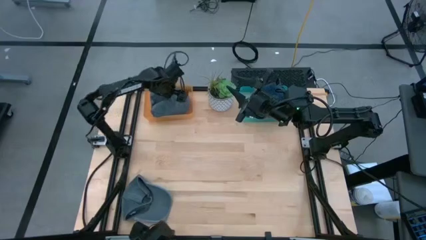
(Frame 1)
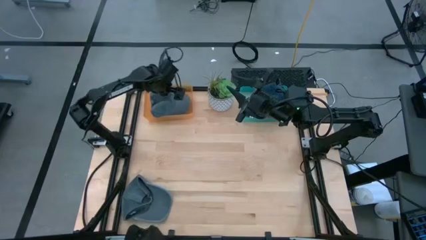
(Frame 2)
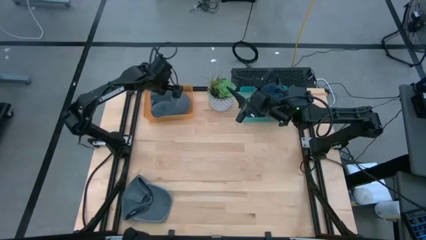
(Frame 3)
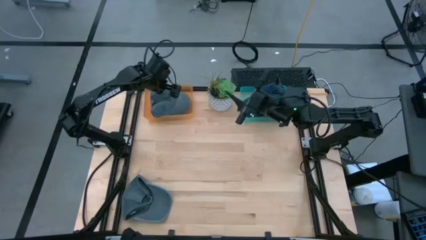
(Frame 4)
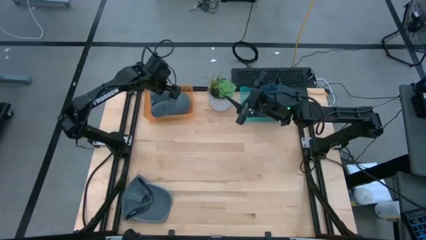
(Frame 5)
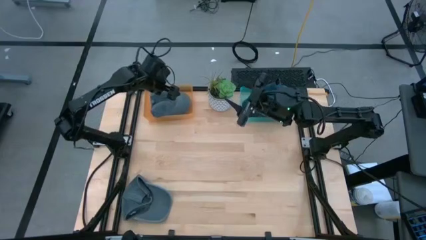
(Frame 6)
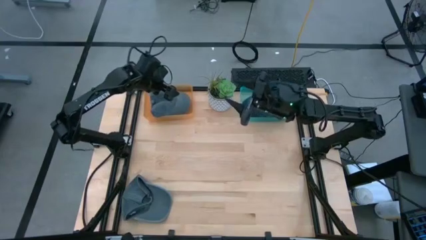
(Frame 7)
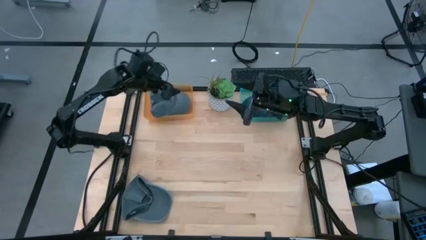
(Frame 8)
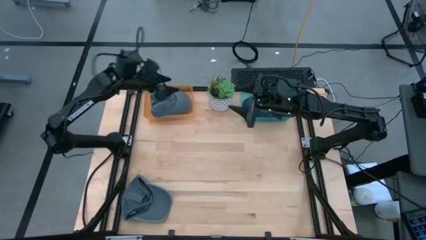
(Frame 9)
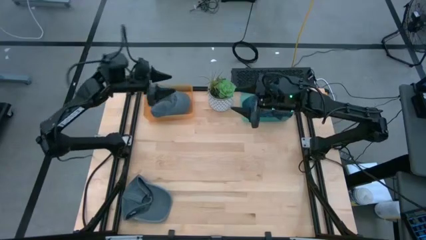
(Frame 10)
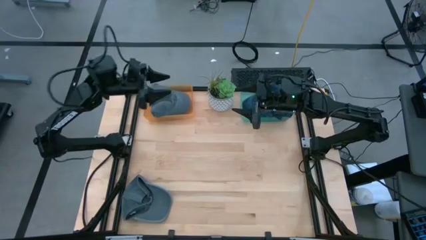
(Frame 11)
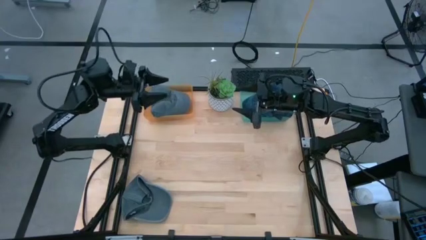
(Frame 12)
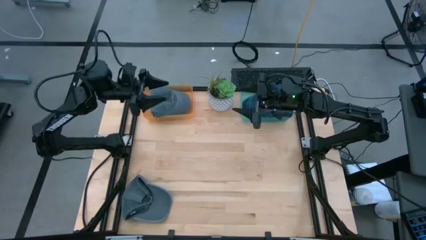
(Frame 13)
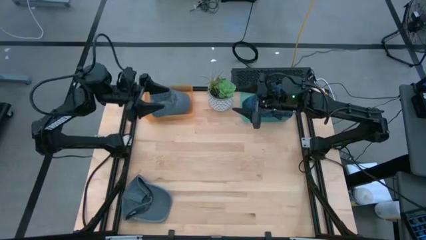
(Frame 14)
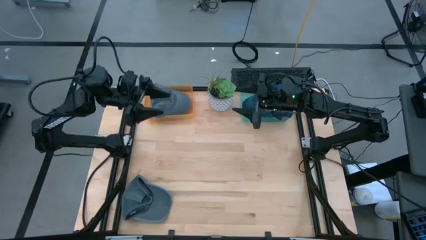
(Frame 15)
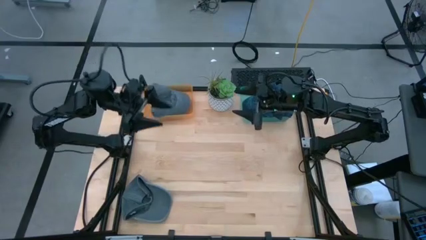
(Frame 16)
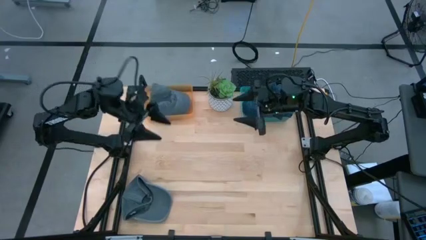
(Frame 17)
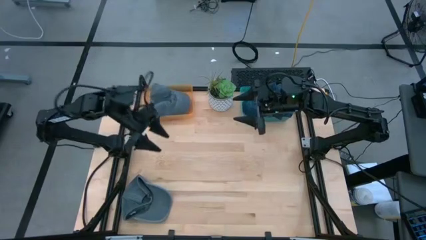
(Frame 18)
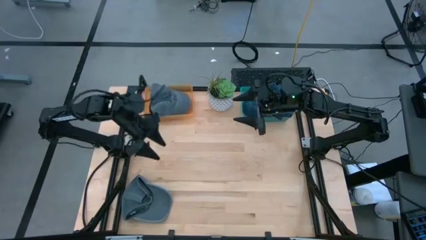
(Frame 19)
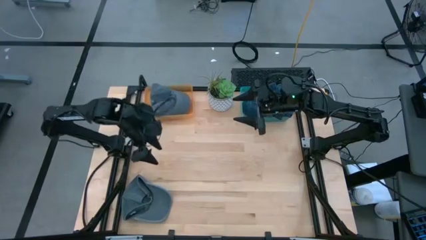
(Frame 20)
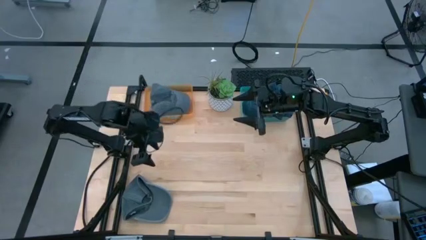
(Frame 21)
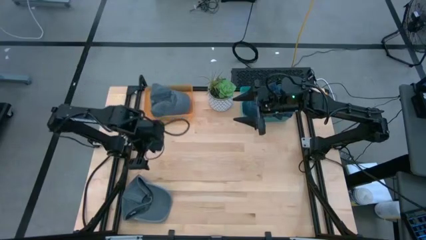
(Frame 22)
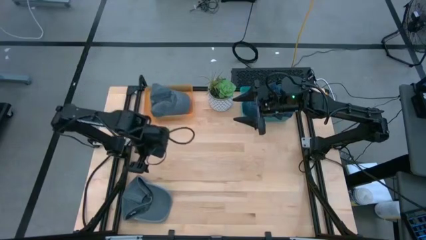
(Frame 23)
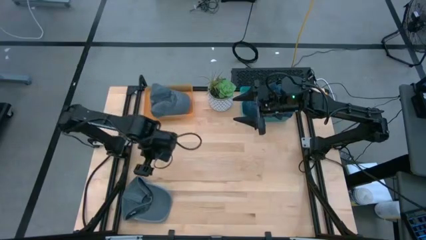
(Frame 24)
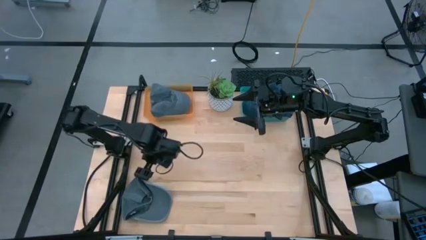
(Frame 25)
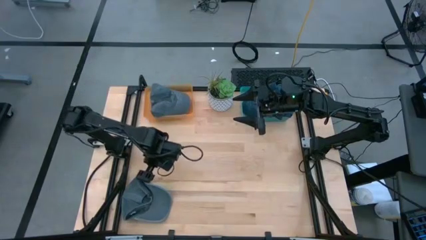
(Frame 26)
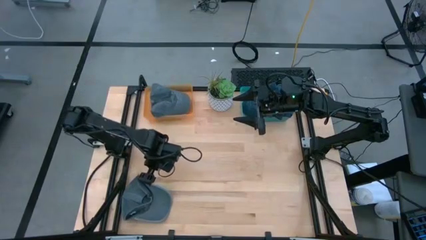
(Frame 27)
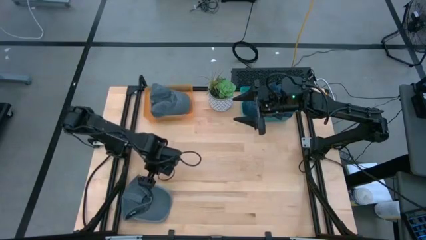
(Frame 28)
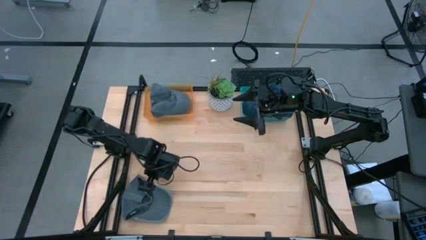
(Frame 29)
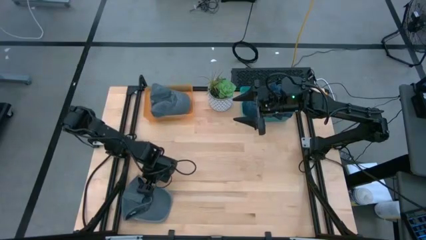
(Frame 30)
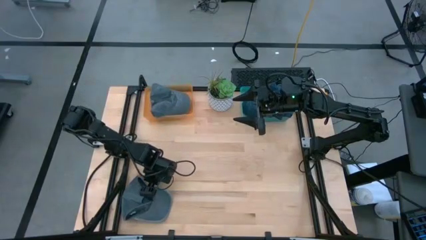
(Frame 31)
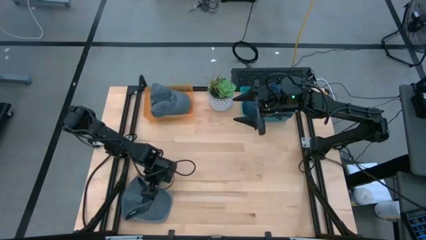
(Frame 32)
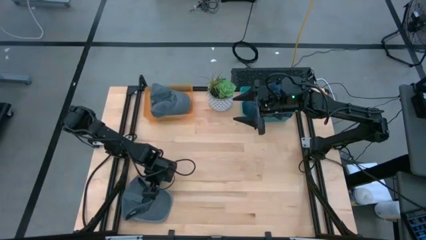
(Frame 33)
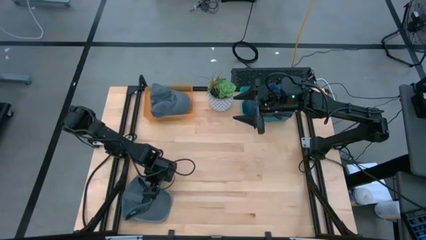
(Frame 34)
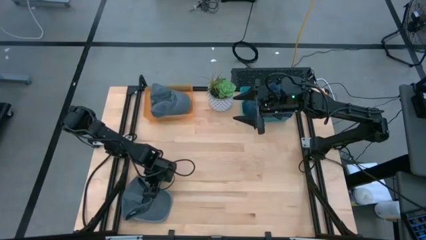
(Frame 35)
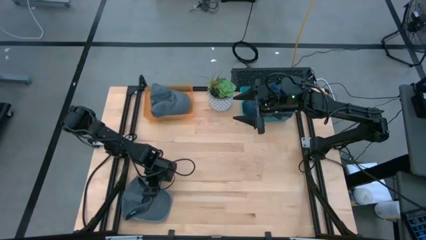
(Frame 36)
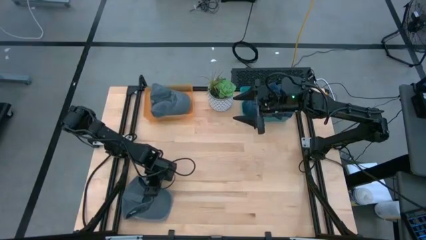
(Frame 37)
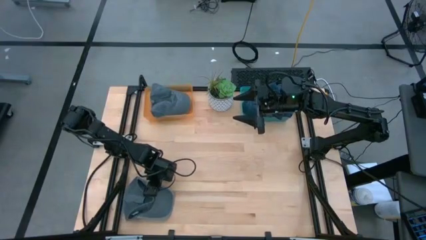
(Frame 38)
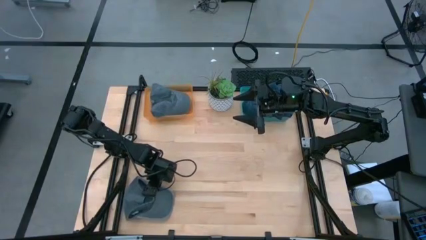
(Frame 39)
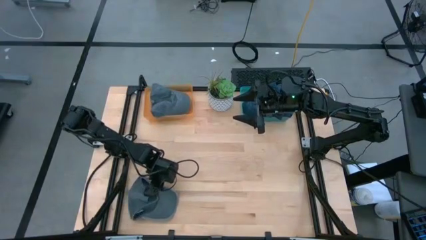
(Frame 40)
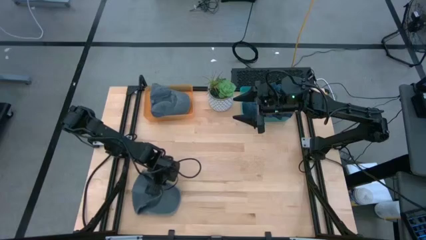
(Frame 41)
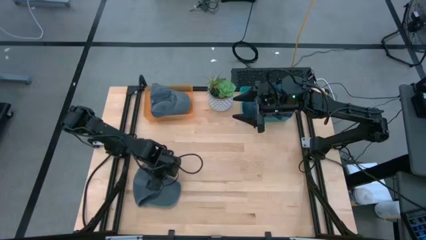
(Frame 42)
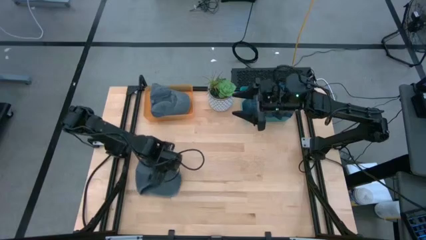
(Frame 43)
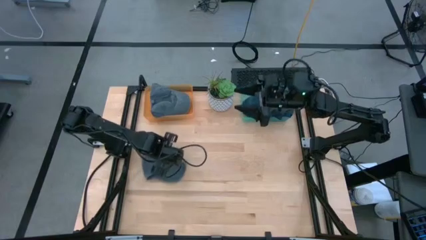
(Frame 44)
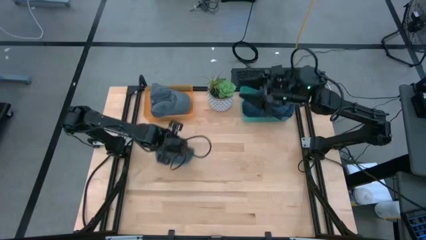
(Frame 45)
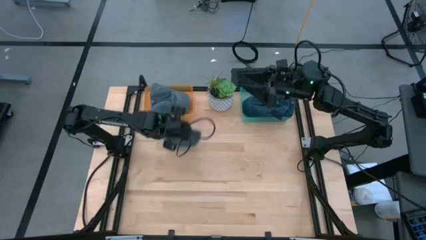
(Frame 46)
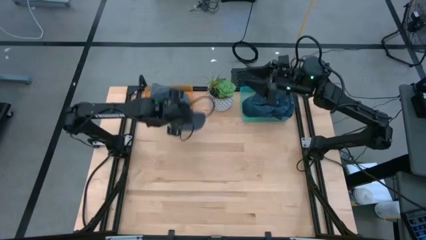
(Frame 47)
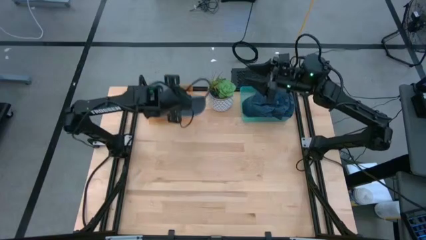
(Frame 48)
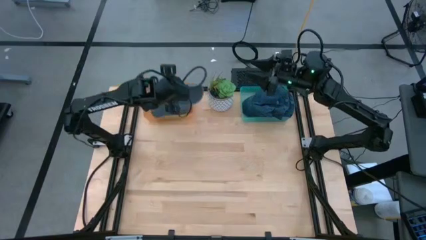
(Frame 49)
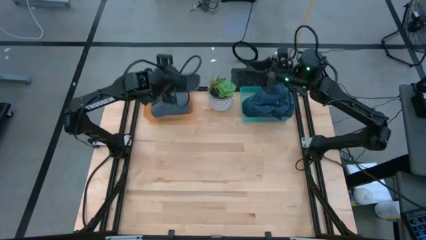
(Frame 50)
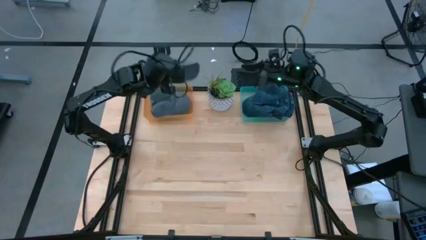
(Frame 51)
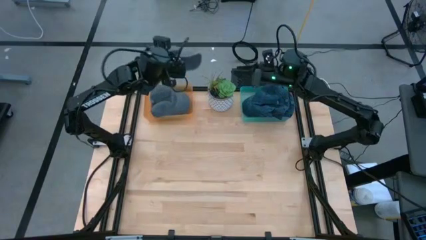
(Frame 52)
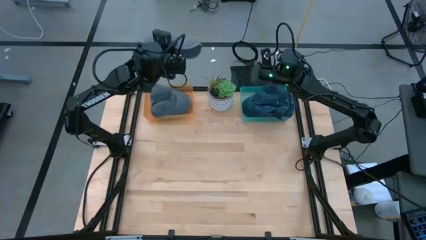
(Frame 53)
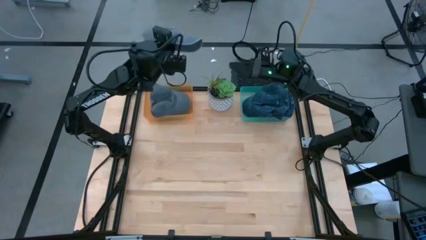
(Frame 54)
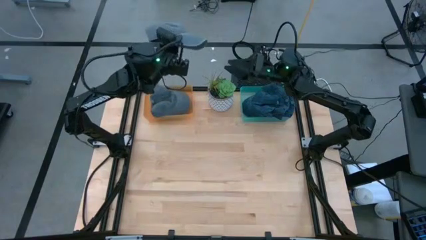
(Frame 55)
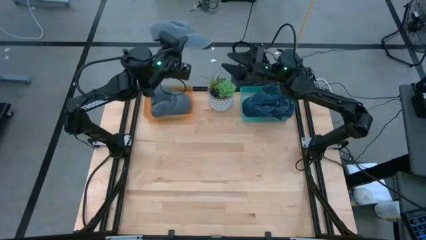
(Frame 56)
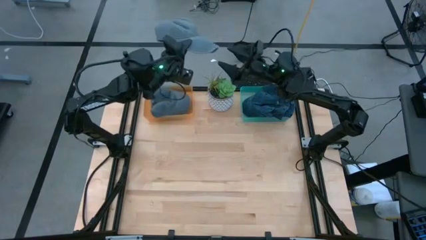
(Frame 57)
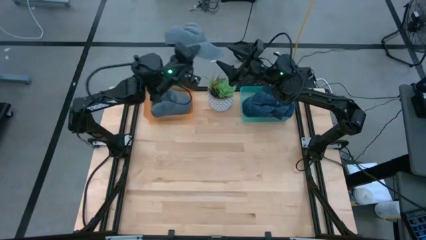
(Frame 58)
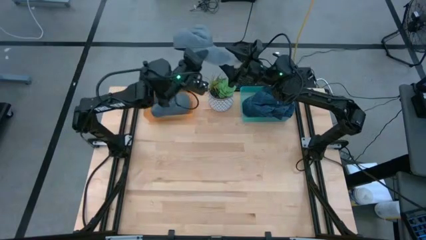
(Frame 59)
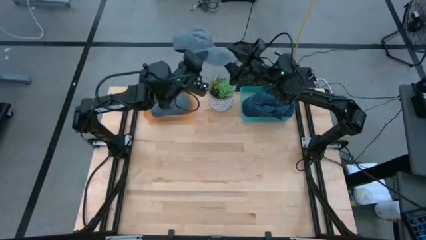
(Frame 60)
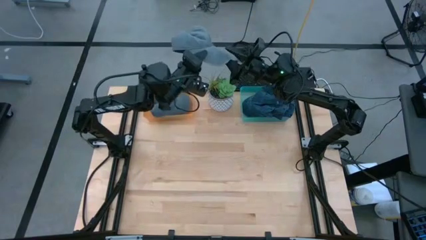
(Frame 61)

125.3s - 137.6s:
Task: Pick & Place hat
Put the gray cap into the orange bin
